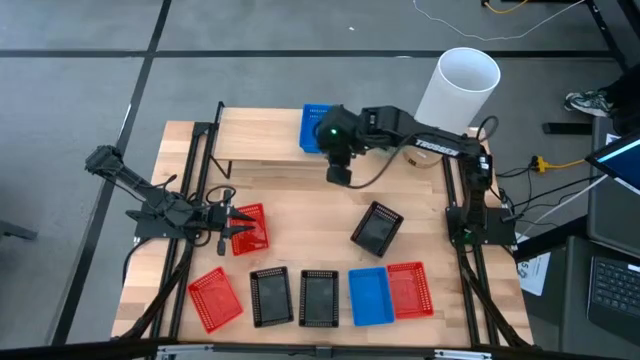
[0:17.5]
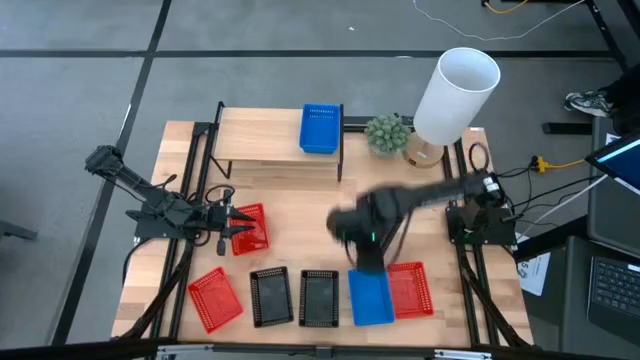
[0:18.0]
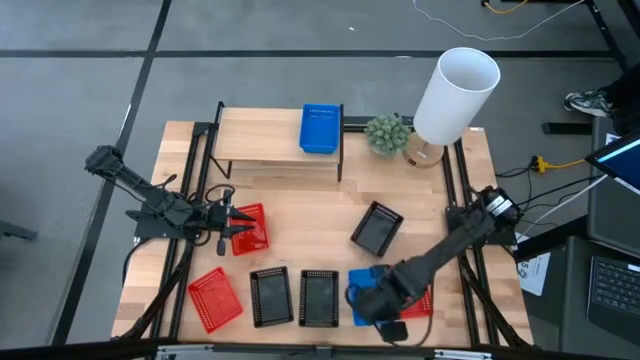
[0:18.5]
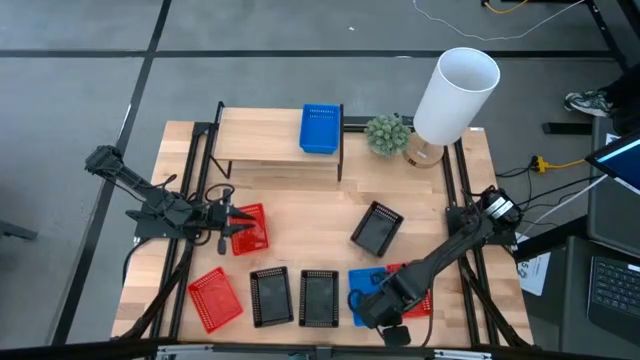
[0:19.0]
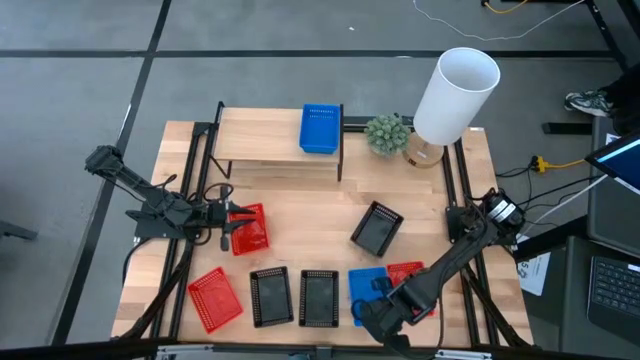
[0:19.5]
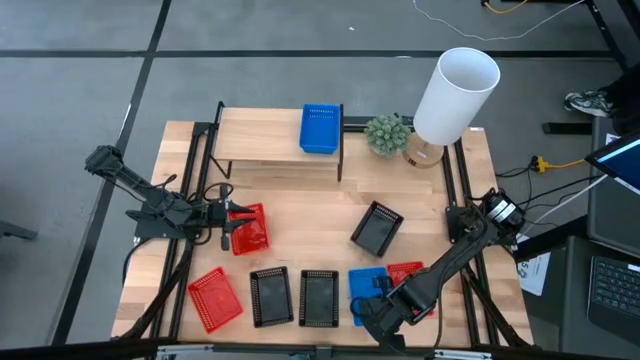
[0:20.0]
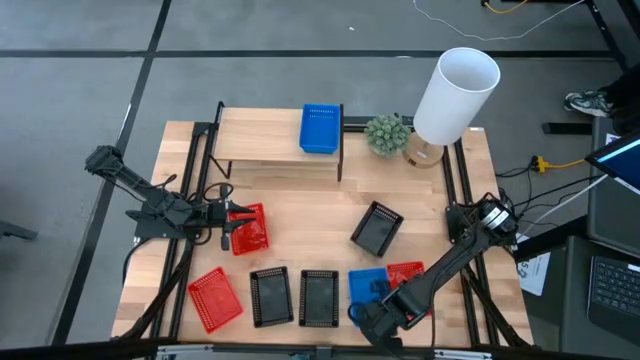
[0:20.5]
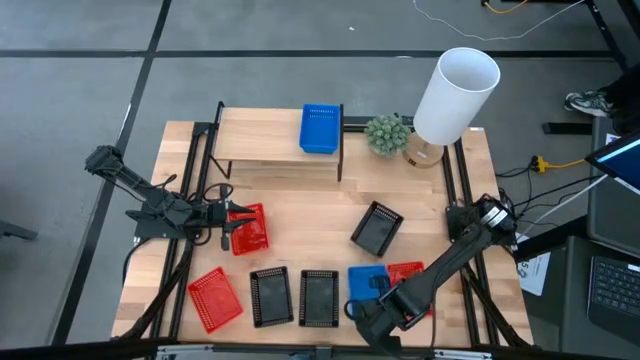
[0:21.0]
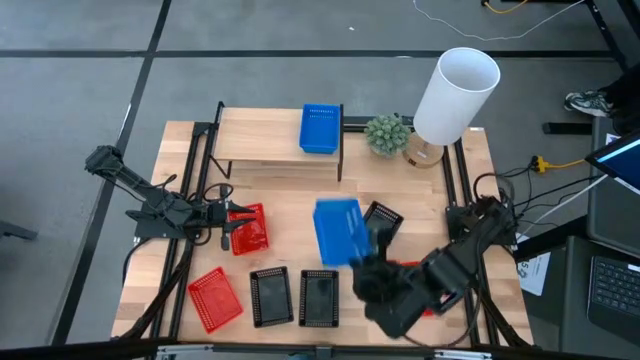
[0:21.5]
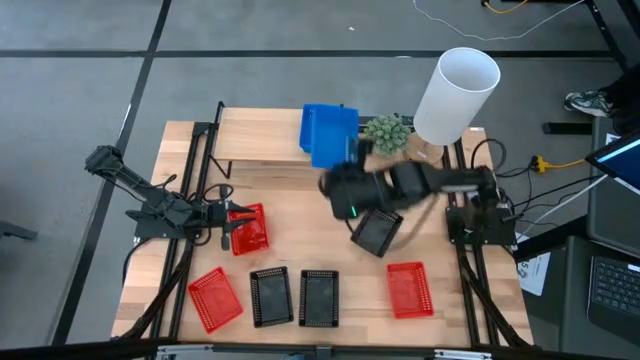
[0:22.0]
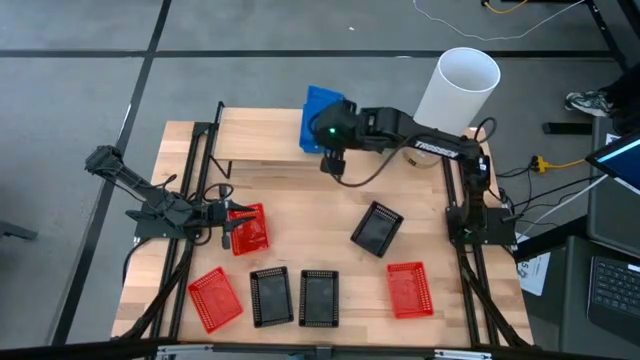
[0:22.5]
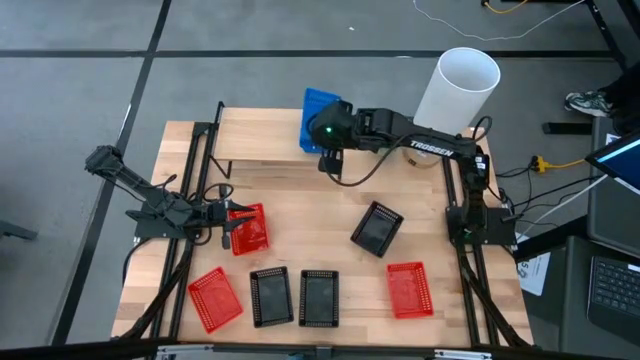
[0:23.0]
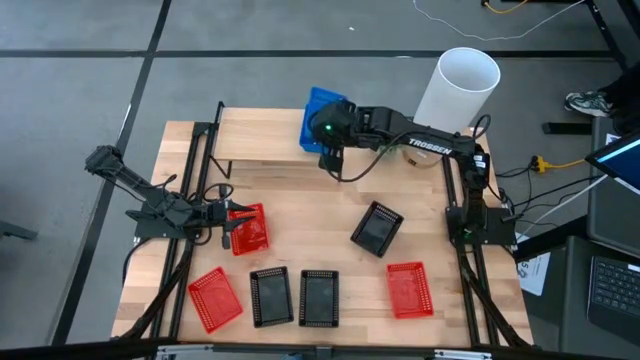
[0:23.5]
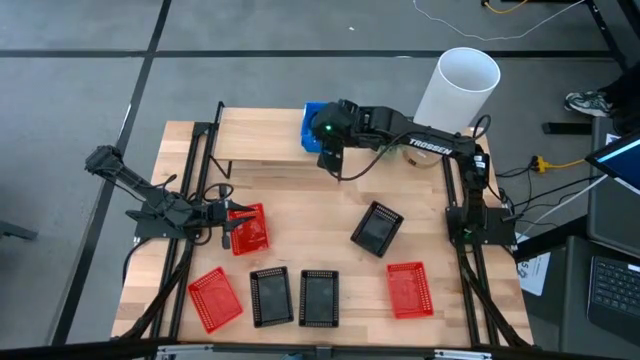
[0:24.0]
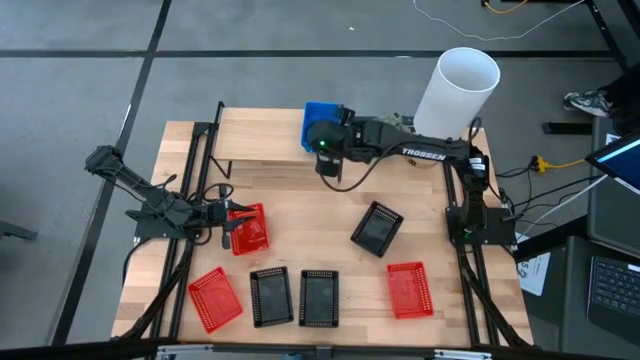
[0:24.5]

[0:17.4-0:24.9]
Task: Stack baskets on shelf by color
Stack the blue bin on top of the stacked blue bins on the shelf

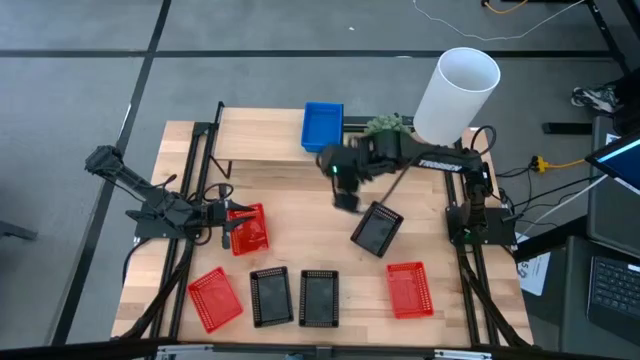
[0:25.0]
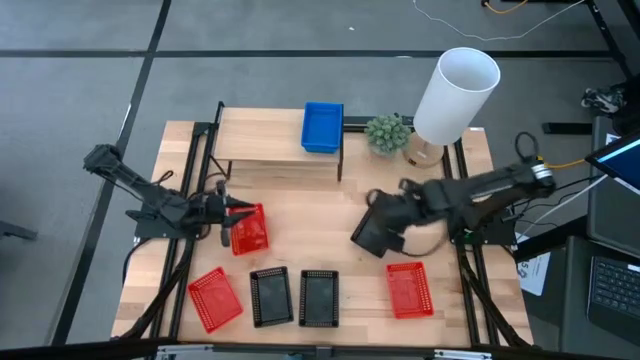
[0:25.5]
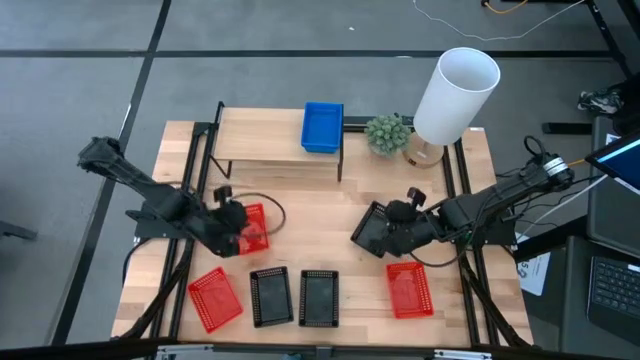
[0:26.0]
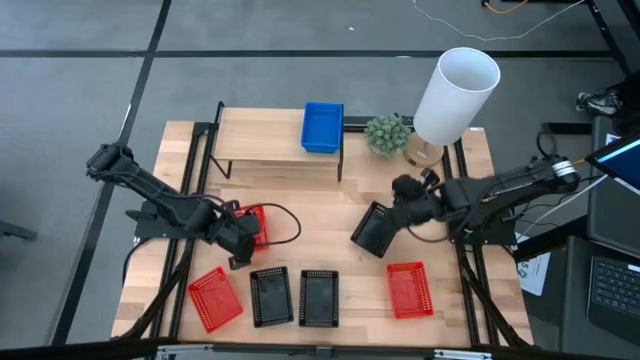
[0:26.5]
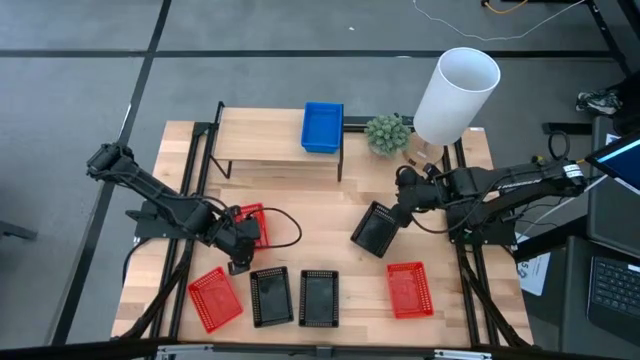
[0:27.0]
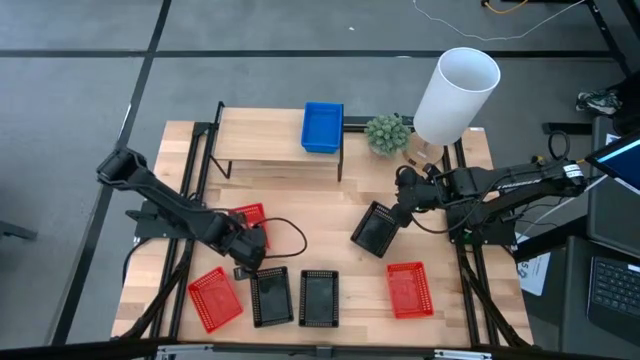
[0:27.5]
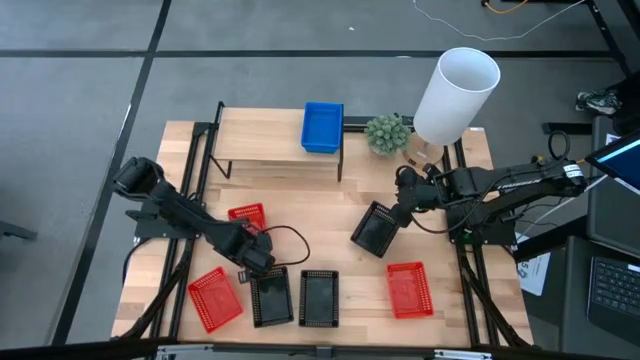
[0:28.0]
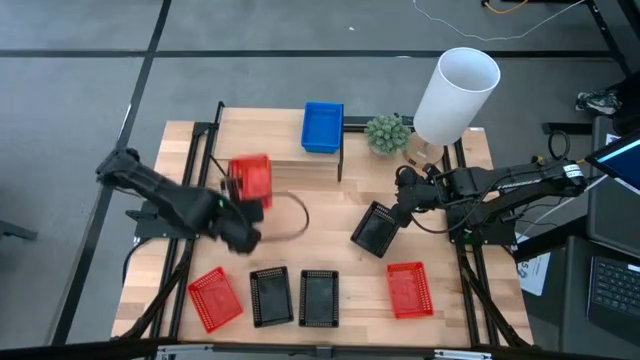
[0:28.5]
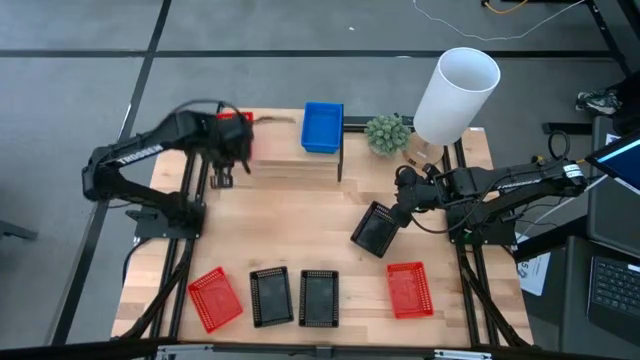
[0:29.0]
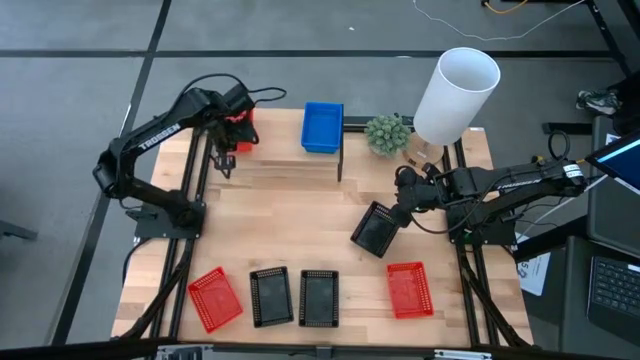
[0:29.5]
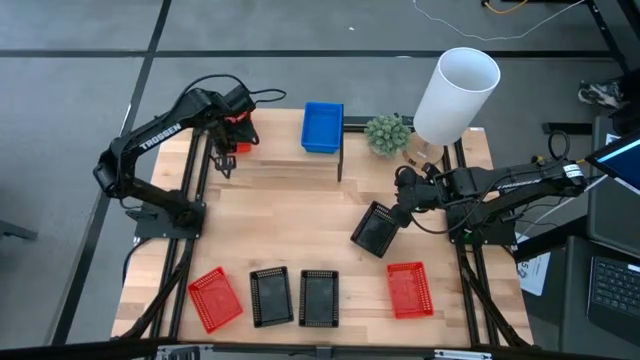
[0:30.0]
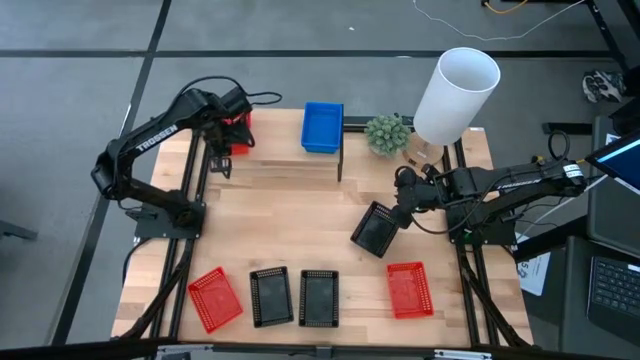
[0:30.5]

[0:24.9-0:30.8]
Put the top left red bin on the shelf

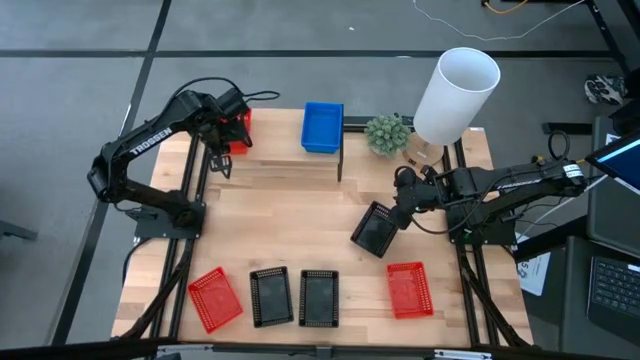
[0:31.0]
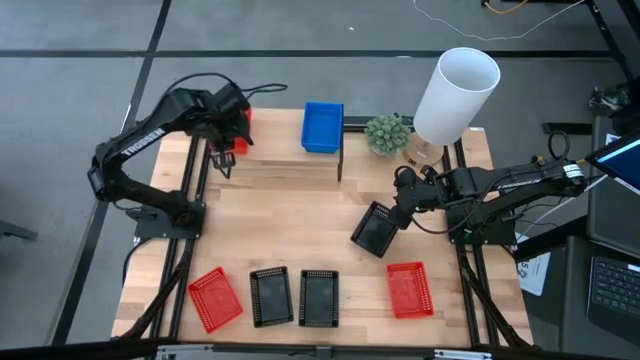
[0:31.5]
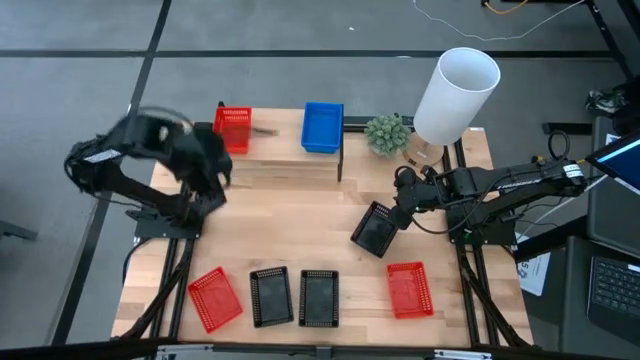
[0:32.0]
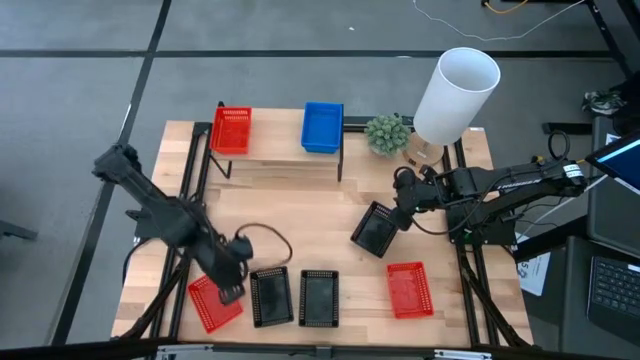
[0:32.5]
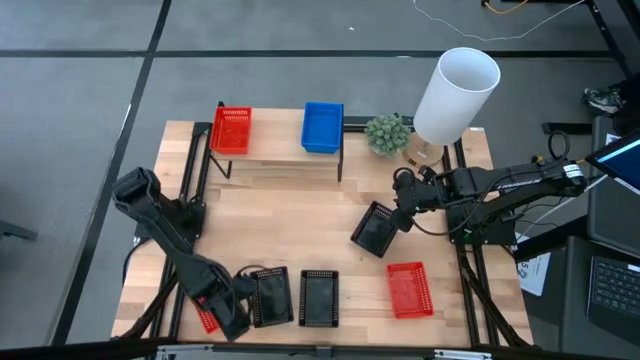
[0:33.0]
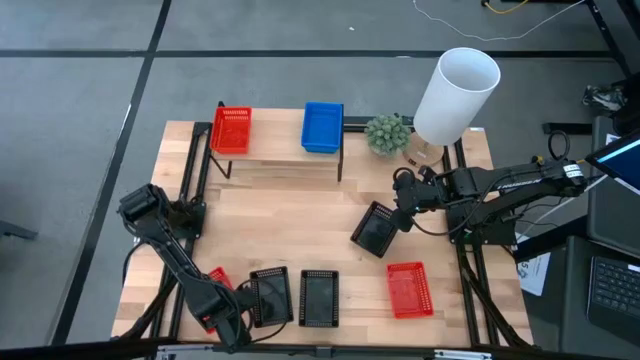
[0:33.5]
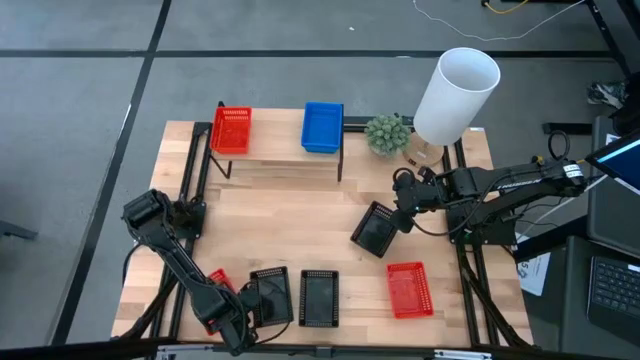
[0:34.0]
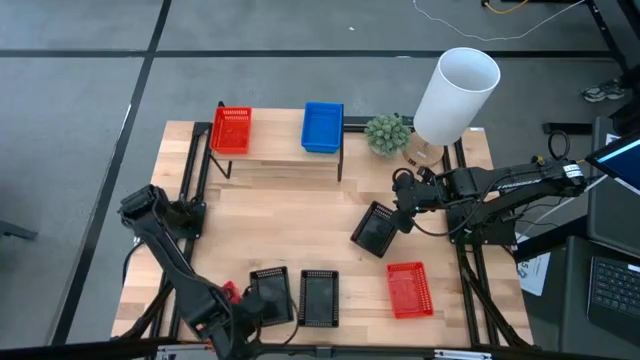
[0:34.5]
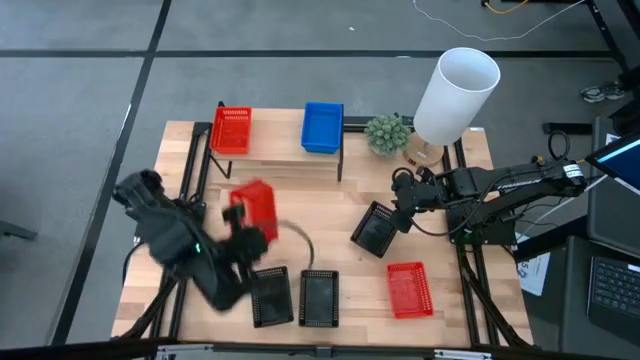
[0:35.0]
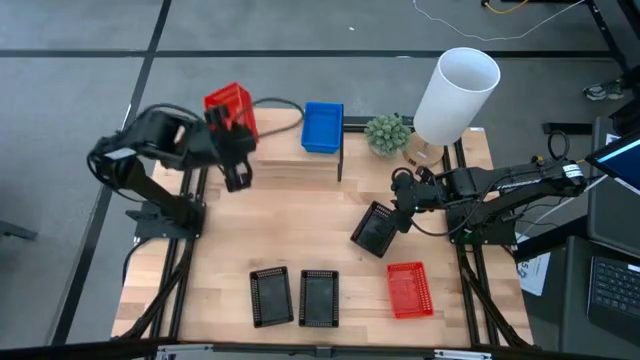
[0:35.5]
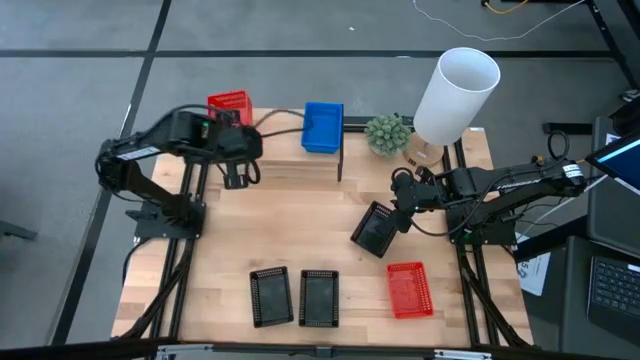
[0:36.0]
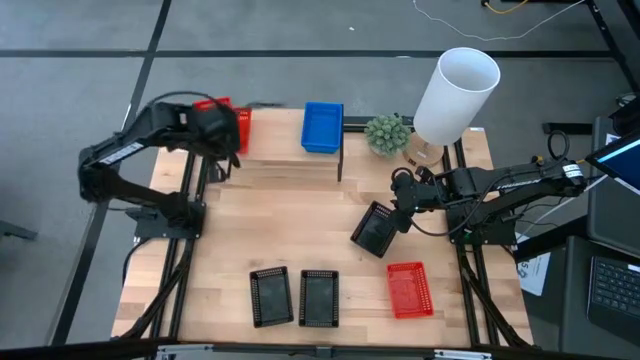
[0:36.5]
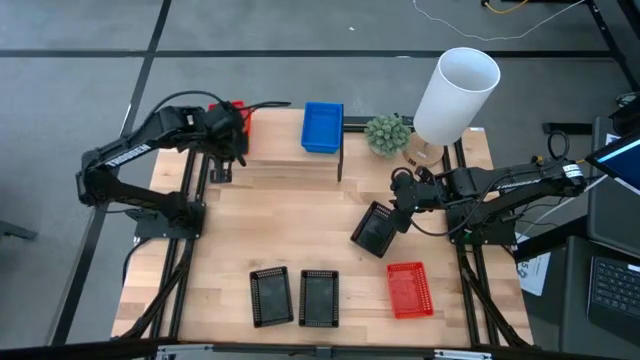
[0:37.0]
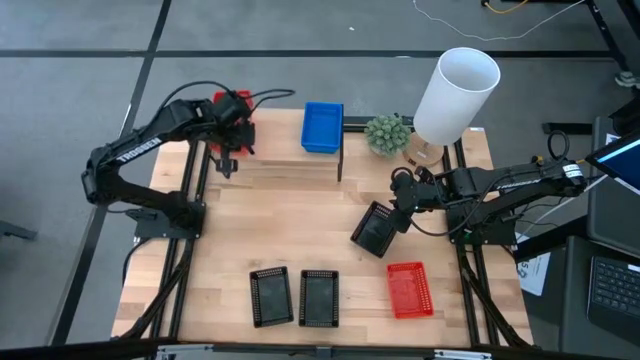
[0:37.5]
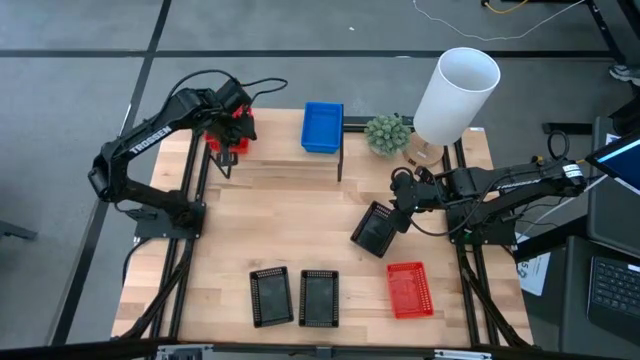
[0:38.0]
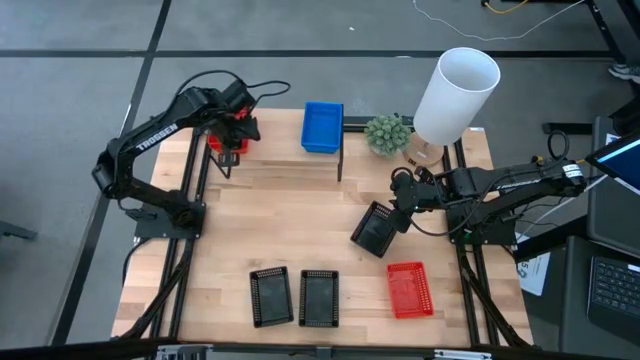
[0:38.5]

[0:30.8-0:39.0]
Stack the left red bin on top of the red bin on the shelf

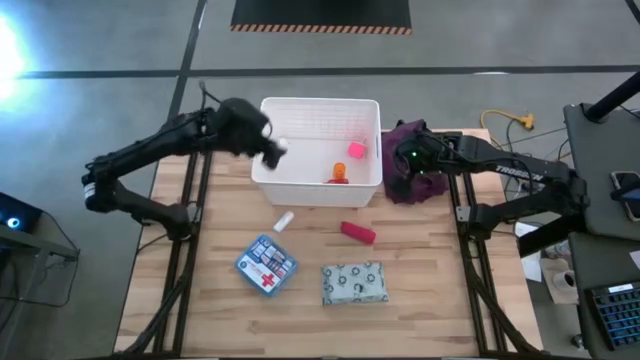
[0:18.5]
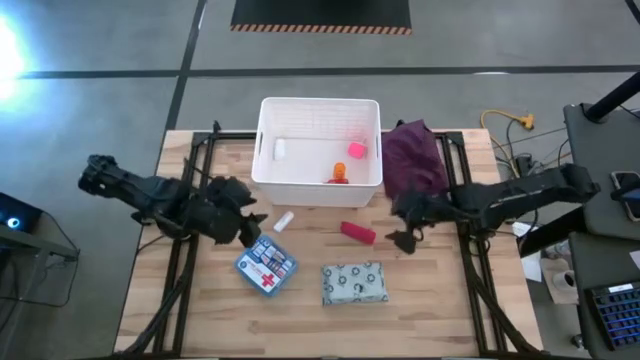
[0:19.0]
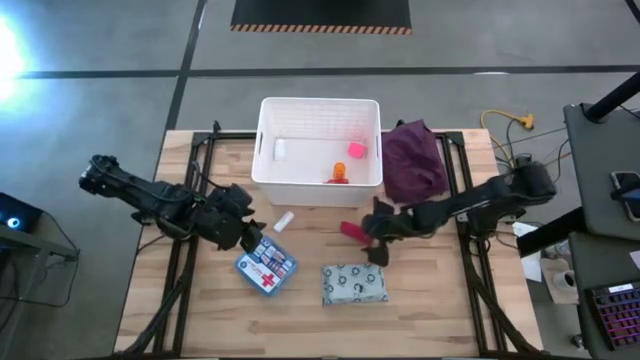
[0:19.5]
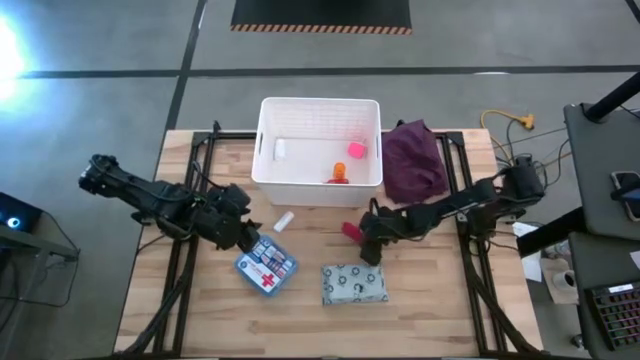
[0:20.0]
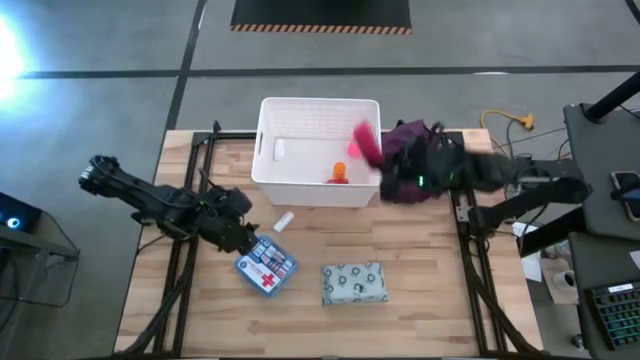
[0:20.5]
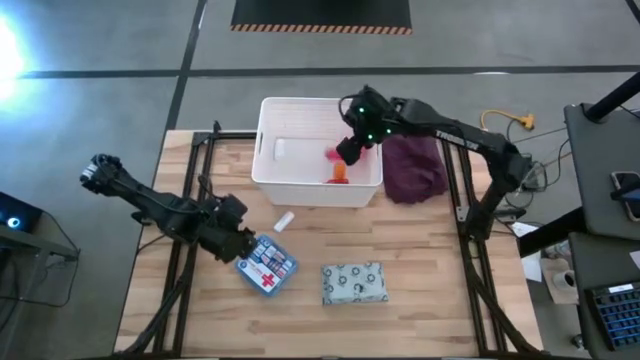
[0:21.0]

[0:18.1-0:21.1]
Task: Pick & place medical supplies in basket/bin
Put the red bandage into the white bin
